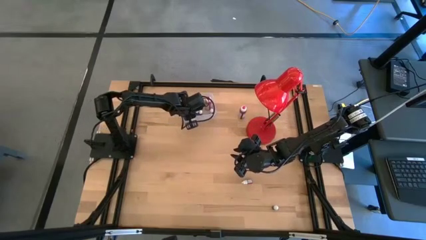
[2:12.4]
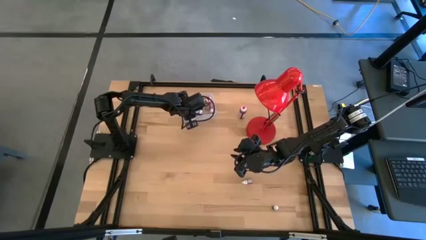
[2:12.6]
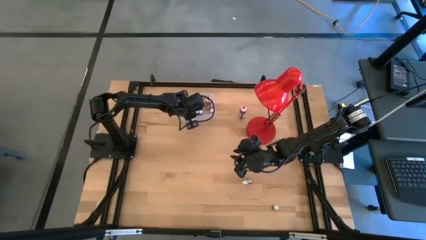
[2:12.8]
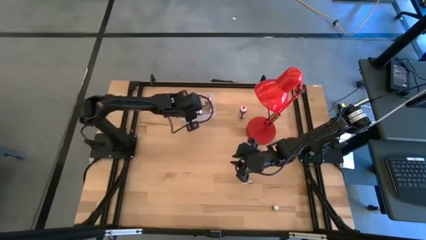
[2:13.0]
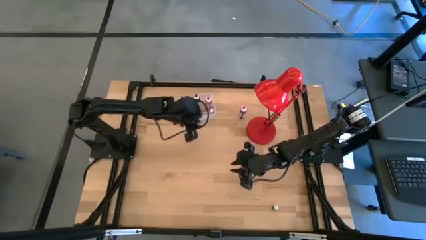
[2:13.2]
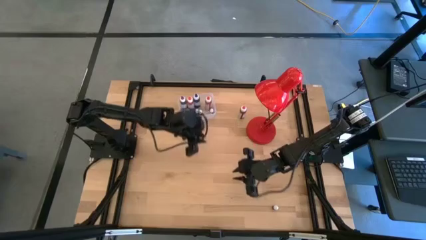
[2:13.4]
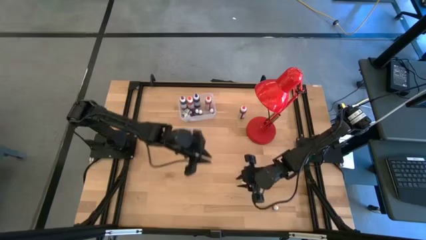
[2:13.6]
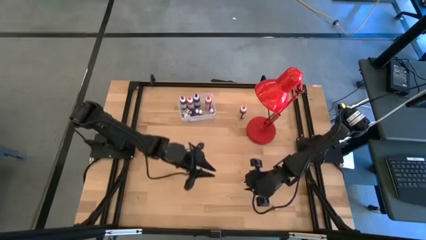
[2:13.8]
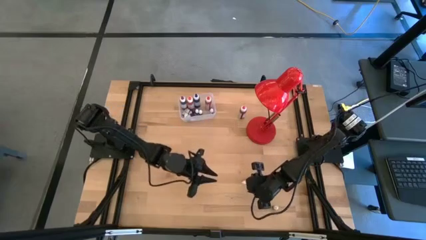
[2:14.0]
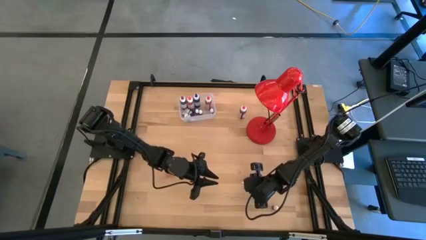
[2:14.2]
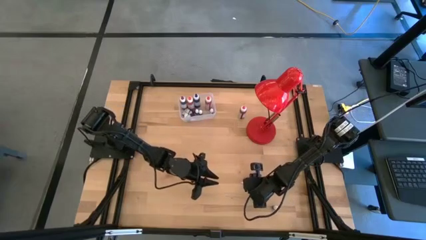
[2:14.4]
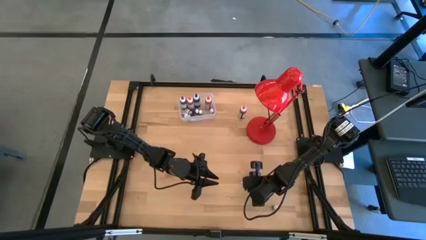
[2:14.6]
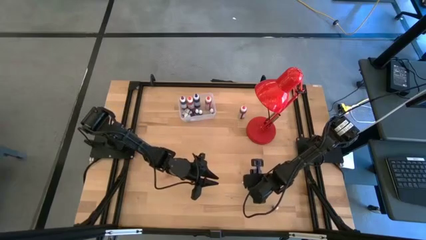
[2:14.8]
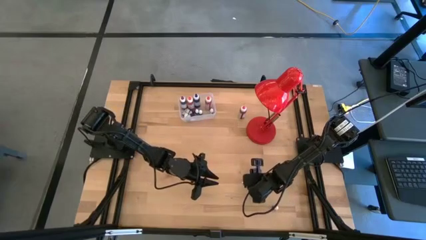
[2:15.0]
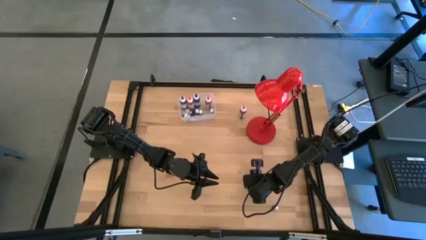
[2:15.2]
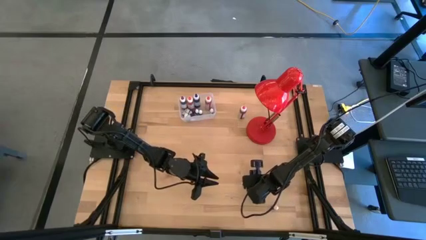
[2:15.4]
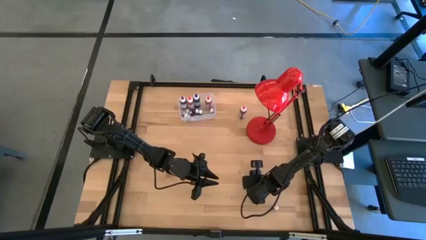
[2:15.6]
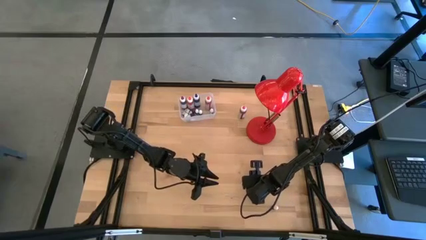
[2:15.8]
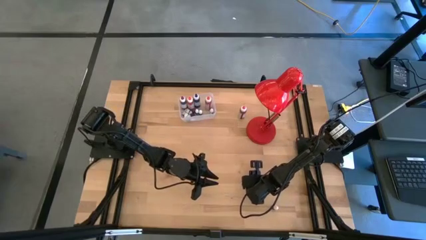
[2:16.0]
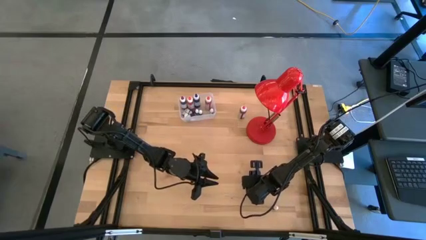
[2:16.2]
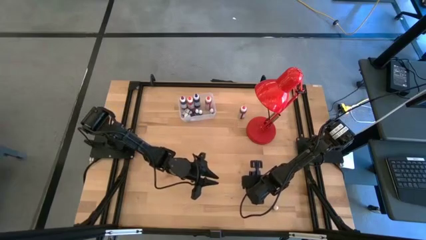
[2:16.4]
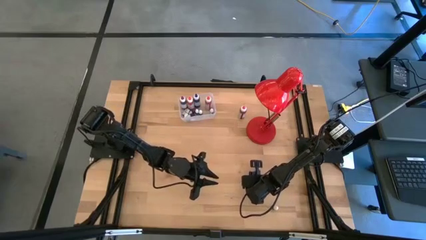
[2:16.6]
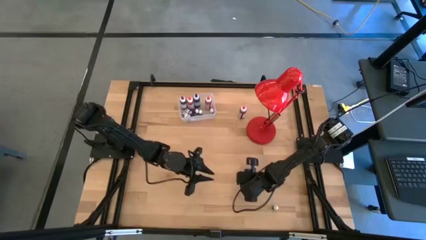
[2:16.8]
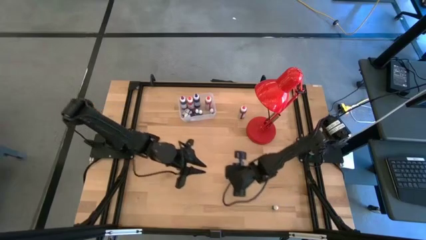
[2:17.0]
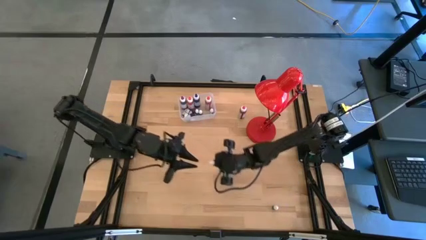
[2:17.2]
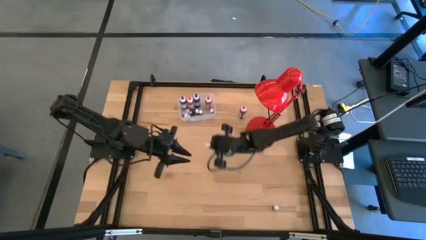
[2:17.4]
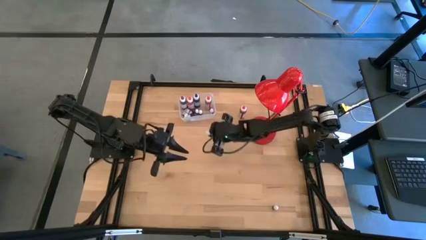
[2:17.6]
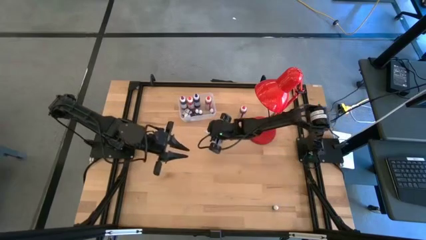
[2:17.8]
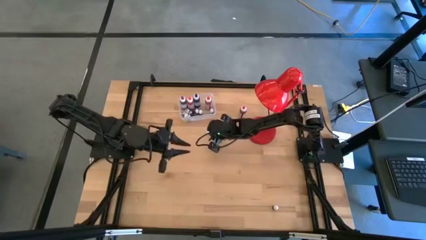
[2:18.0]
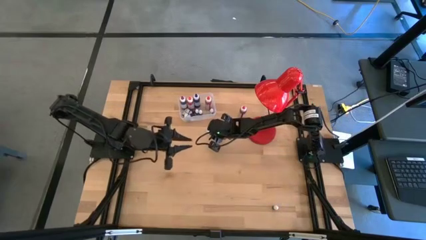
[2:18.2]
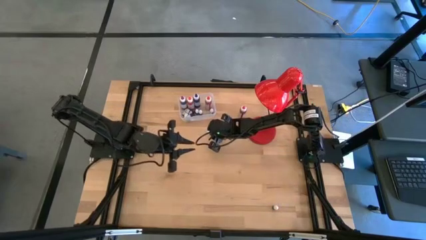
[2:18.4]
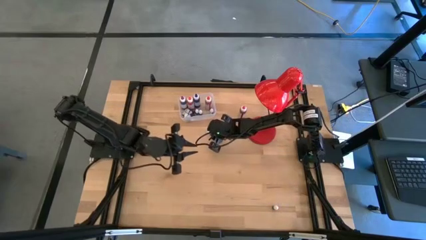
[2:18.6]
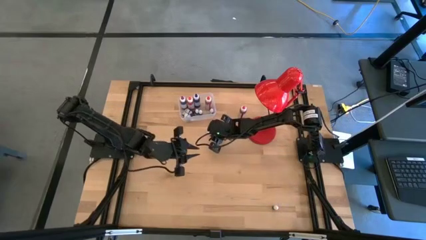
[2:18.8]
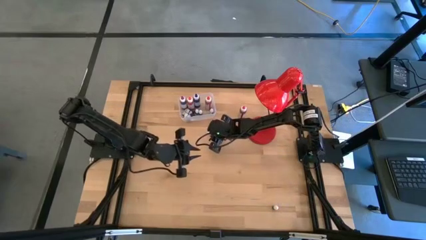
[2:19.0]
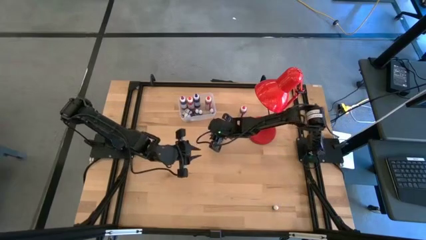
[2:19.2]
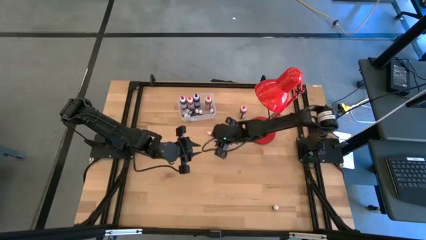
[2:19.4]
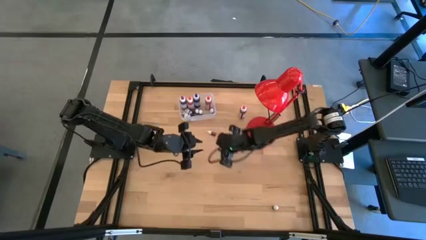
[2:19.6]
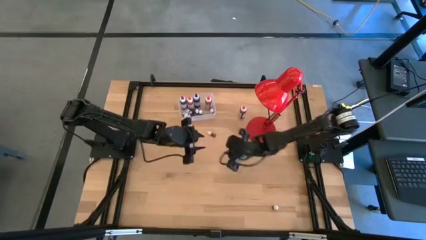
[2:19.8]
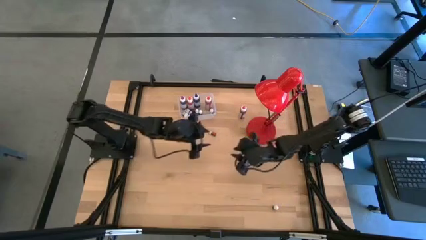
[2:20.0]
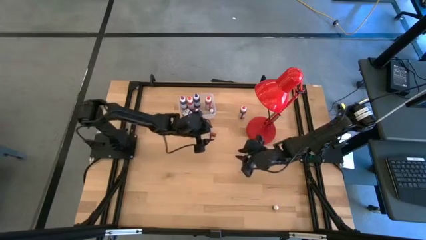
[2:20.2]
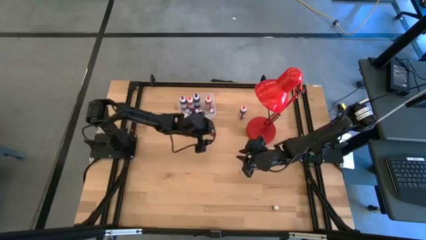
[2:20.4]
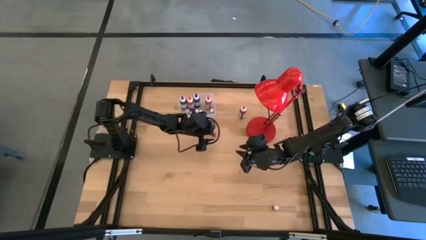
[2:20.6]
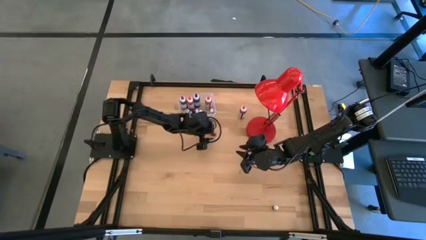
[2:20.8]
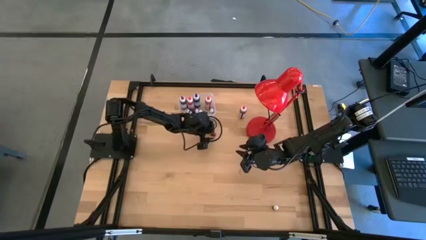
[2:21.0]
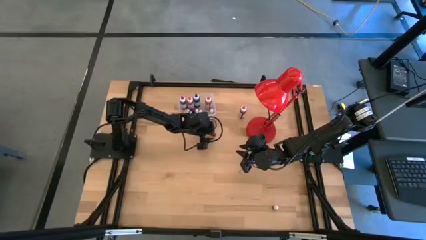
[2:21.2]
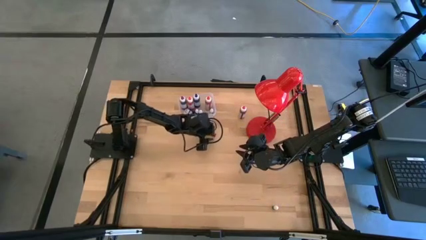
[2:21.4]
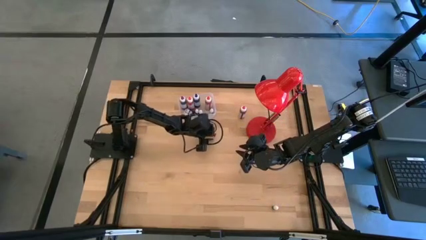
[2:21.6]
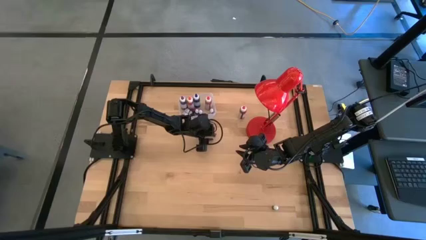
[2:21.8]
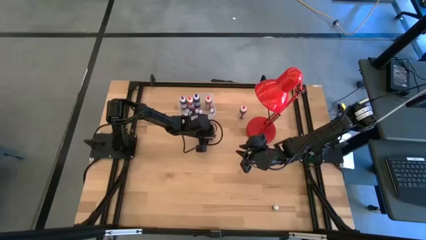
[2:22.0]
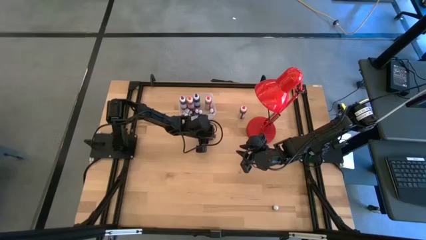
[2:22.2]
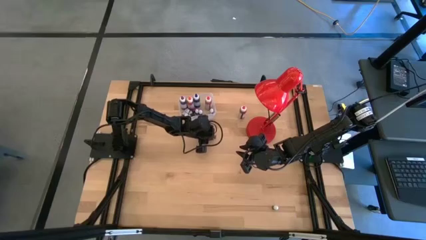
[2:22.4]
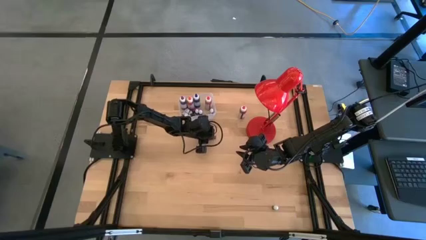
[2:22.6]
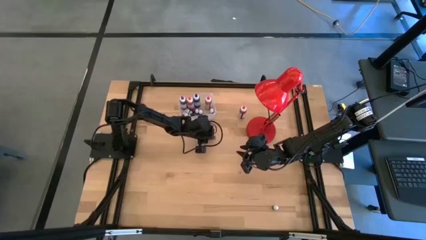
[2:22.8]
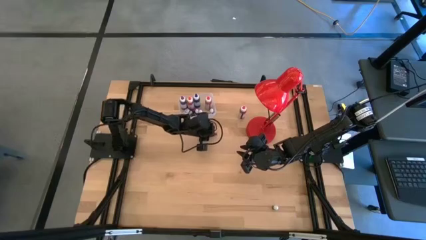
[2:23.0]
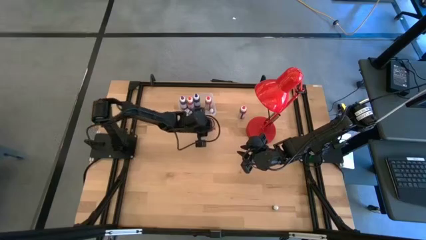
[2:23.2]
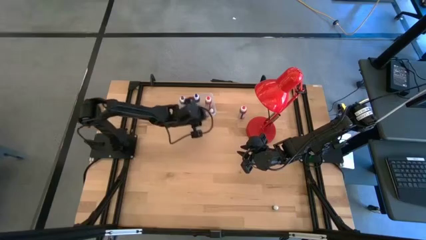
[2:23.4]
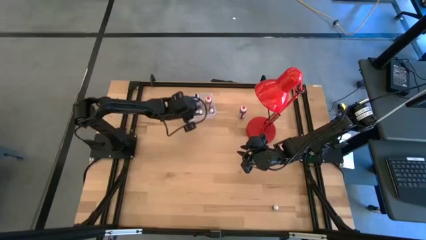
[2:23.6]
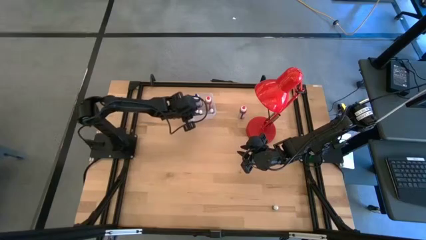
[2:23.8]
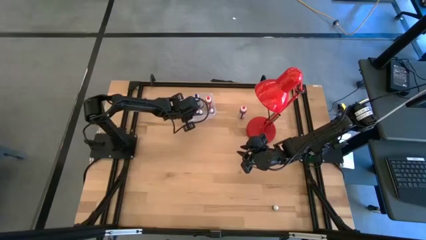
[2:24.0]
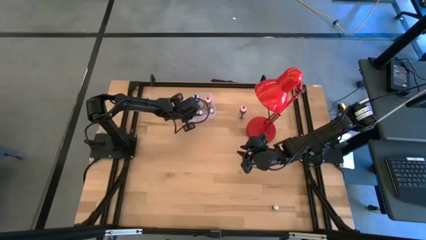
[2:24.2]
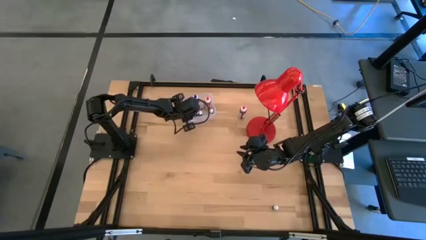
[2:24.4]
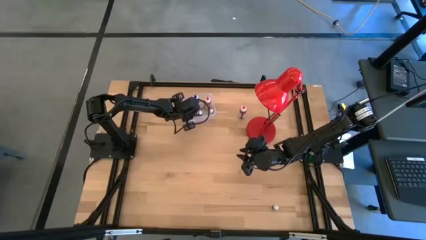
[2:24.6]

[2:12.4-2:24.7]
Task: Pick & Place food coloring
Put the small red food coloring bottle into the transparent bin

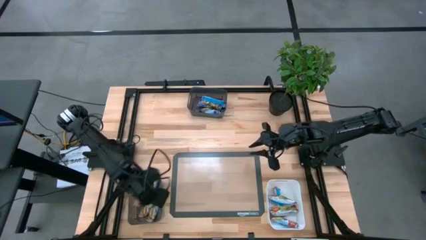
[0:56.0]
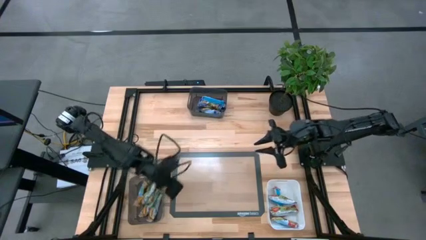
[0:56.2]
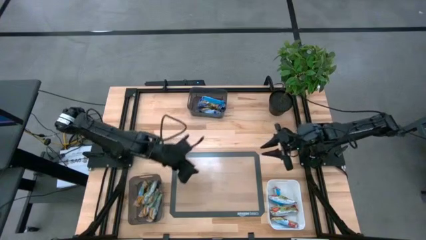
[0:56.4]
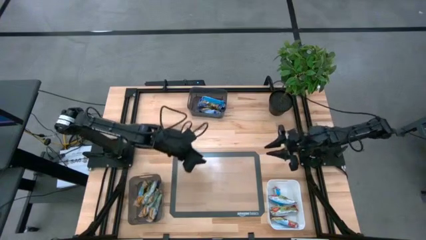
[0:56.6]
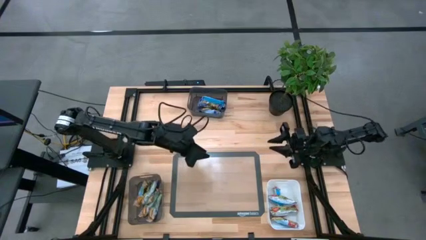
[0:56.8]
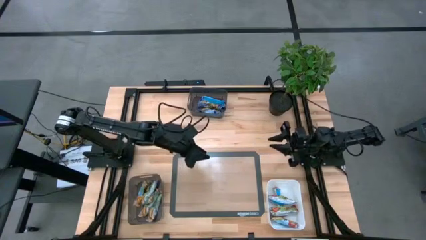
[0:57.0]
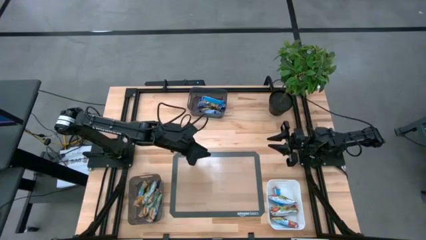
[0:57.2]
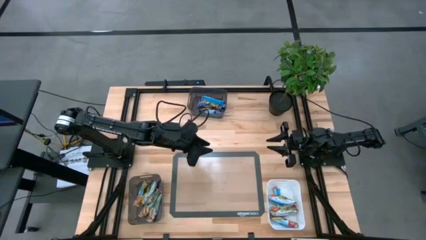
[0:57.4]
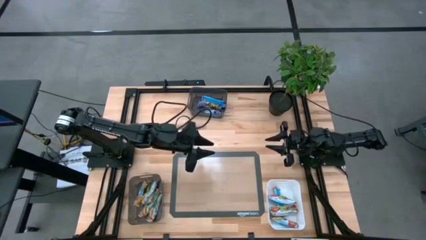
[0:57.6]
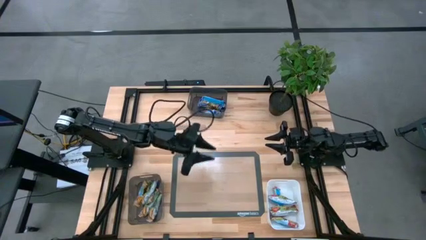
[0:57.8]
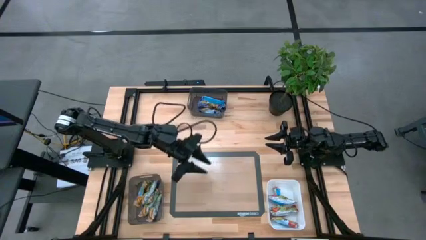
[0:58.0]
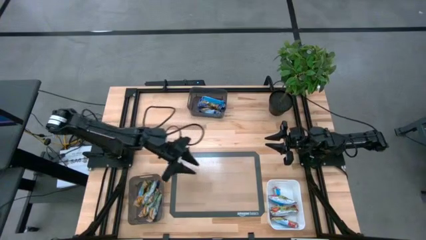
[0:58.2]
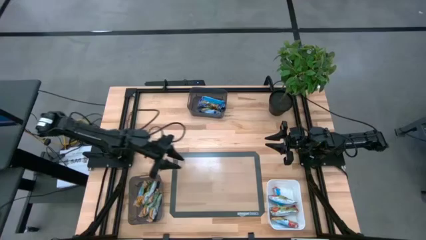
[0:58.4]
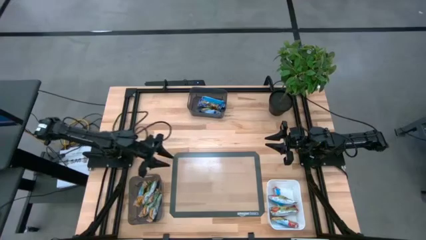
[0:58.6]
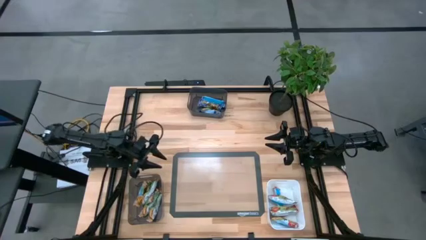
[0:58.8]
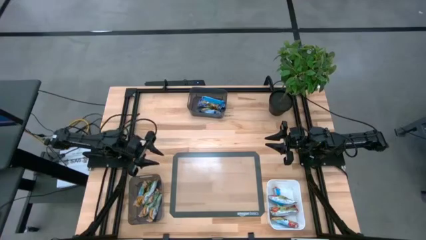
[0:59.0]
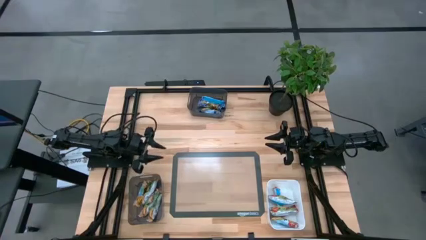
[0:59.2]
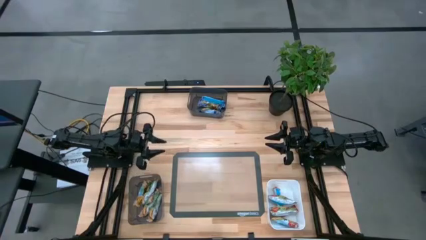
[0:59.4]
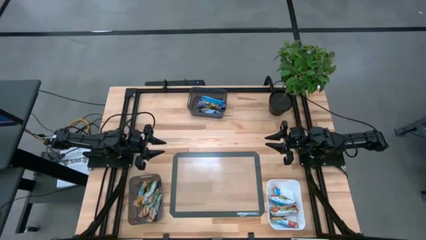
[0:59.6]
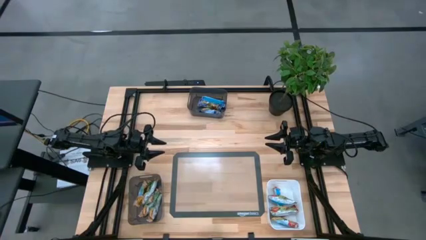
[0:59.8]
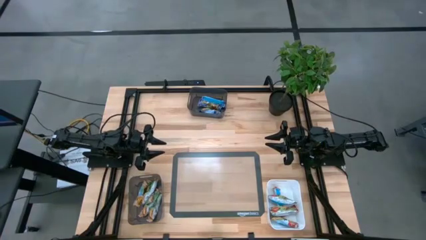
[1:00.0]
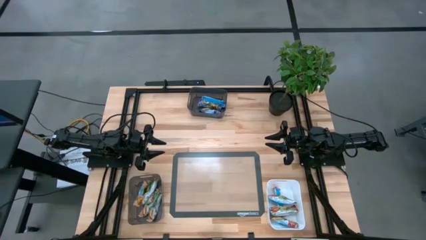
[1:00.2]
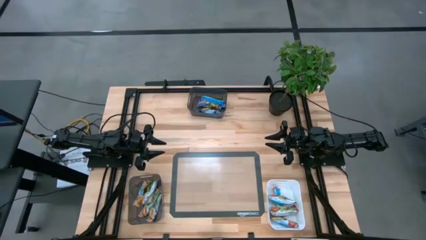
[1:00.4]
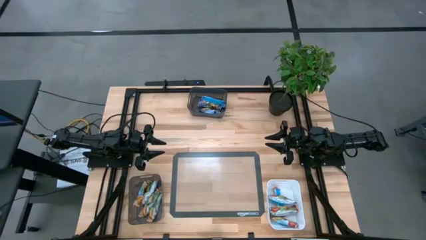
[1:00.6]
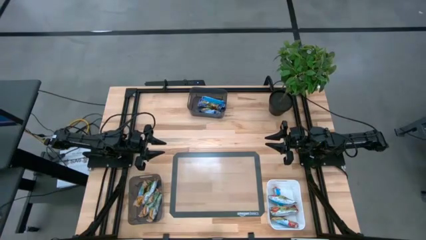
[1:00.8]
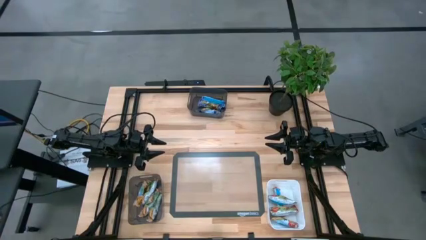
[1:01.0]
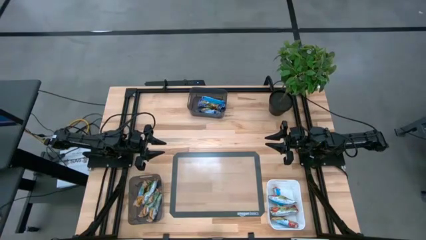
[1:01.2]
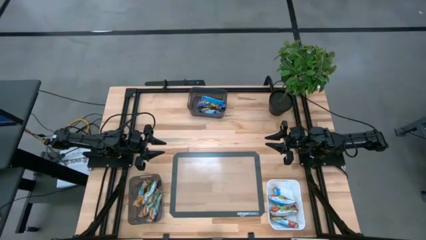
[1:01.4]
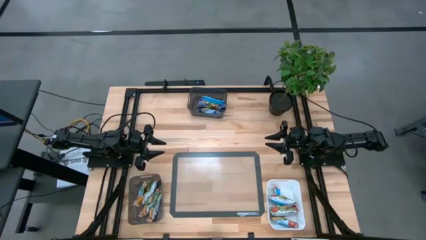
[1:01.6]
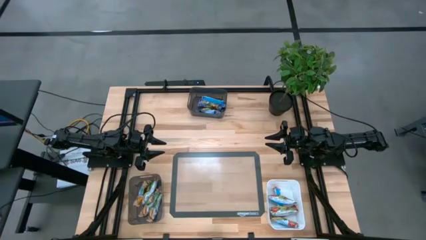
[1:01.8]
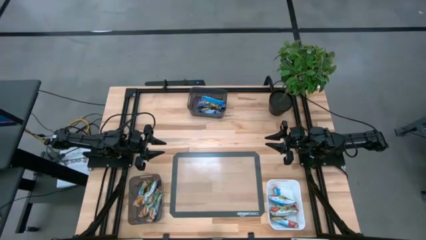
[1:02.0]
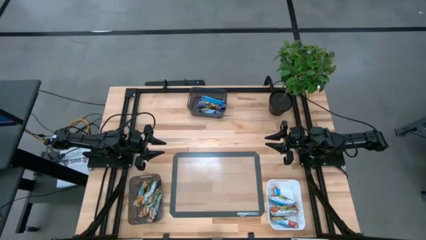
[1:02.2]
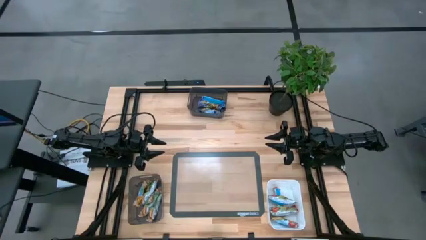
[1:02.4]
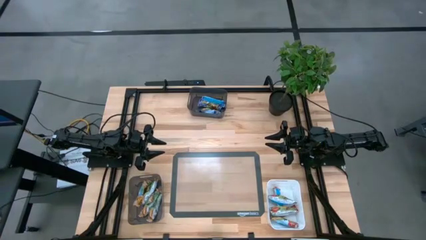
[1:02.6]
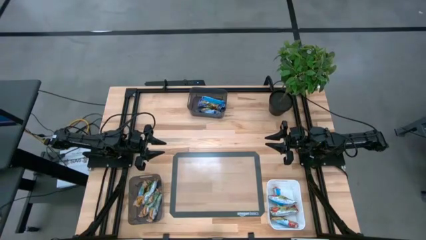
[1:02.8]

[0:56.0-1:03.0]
Task: Pick and place Granola Bars by type
Return to Home Position
